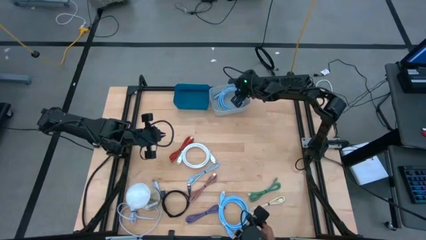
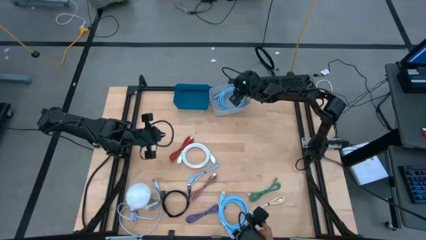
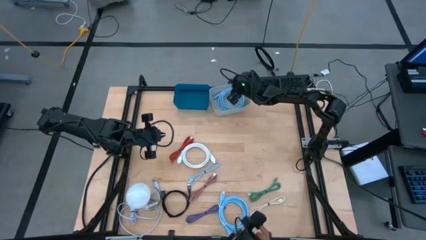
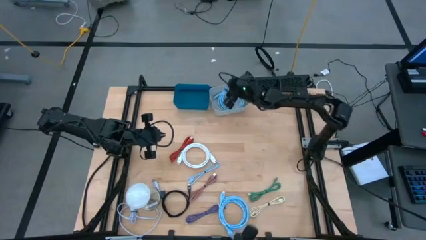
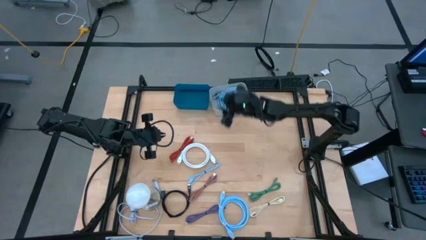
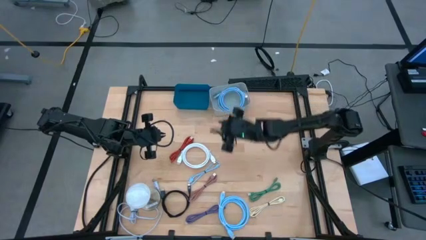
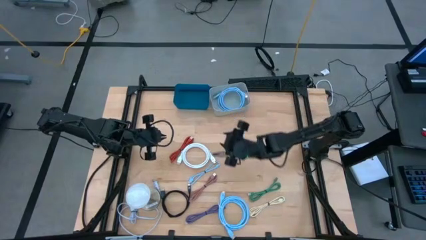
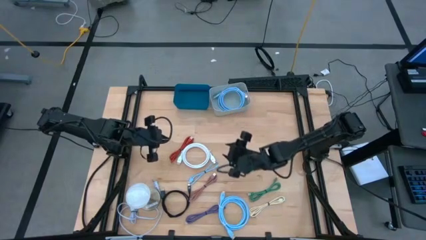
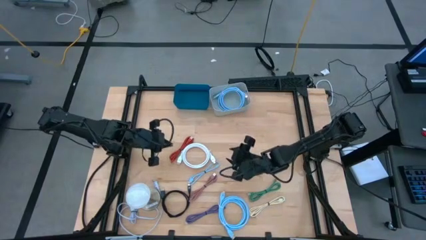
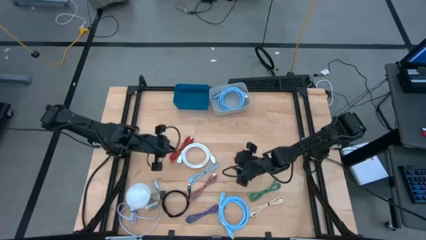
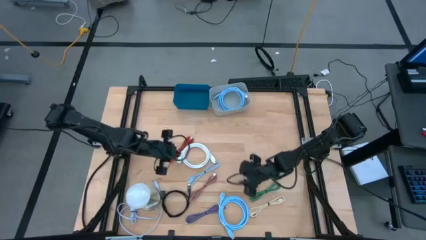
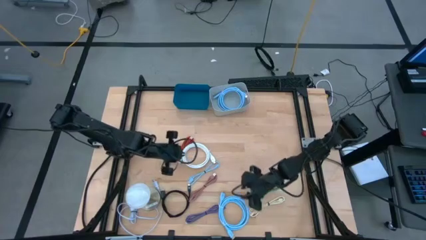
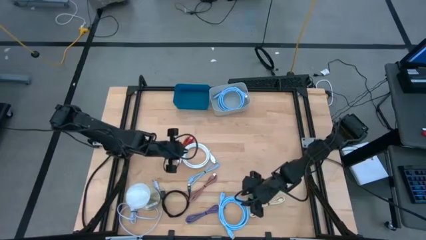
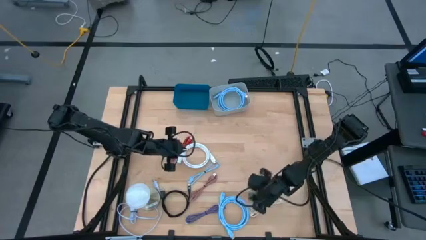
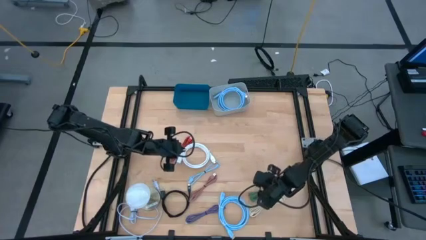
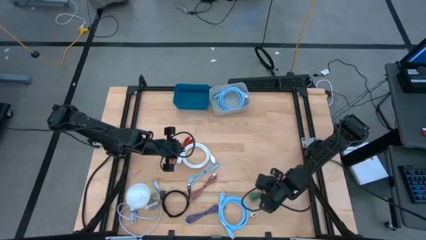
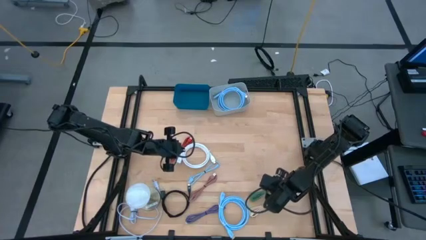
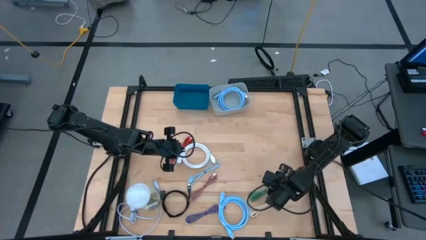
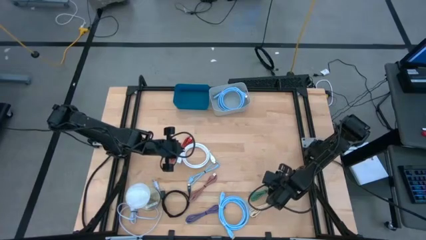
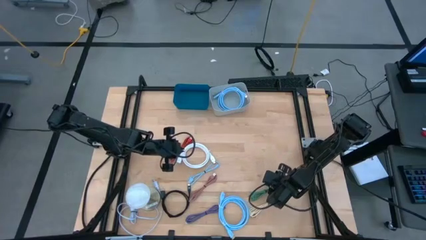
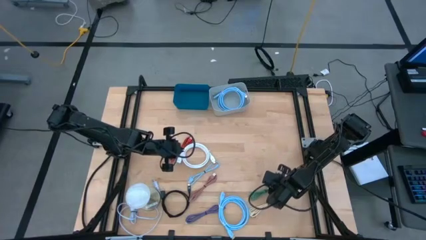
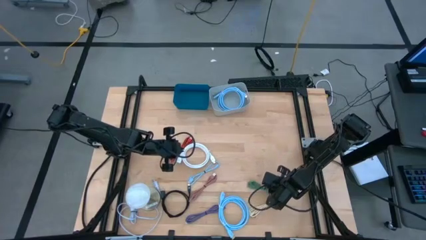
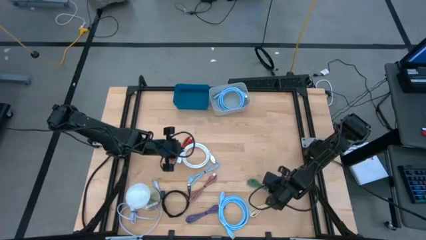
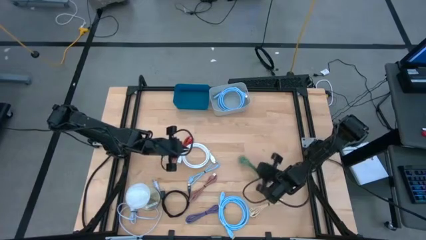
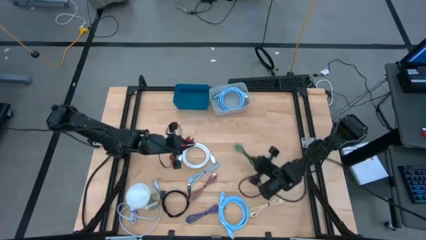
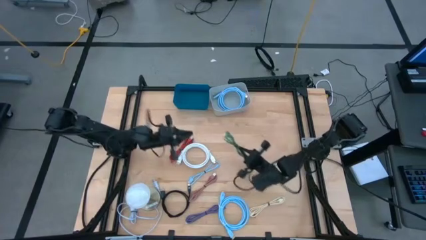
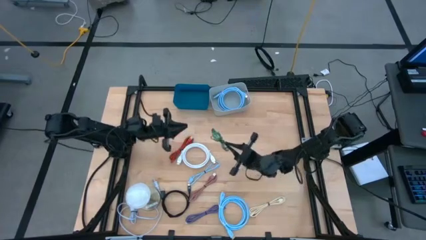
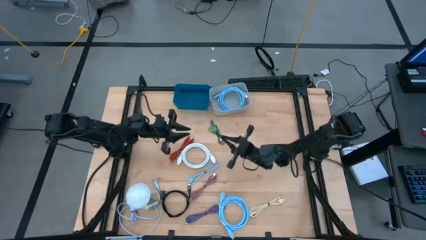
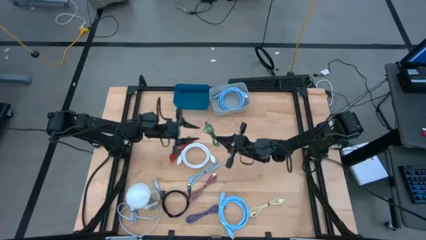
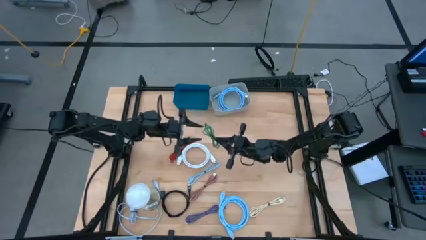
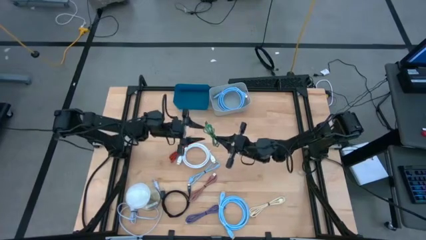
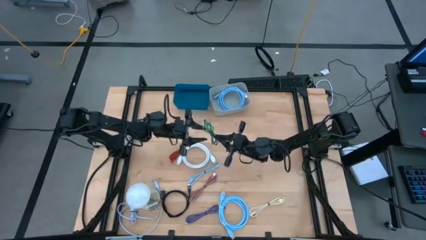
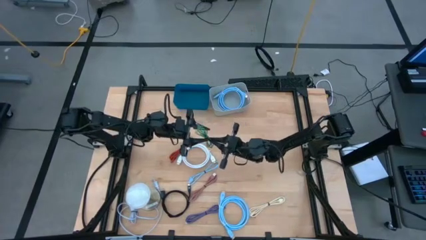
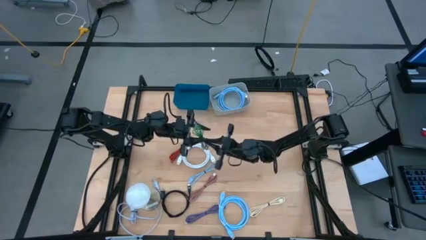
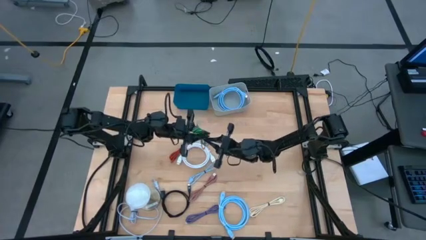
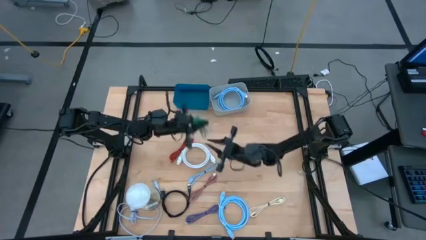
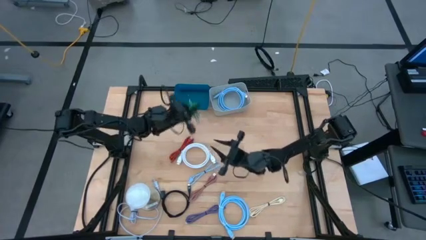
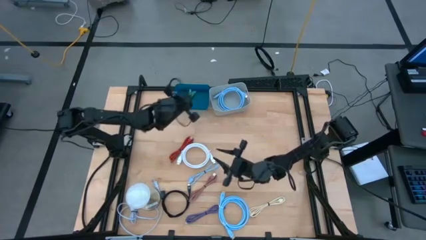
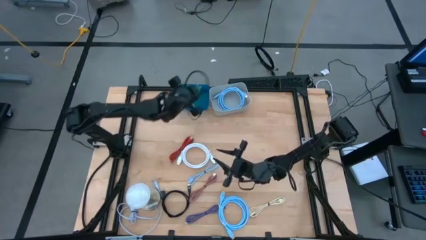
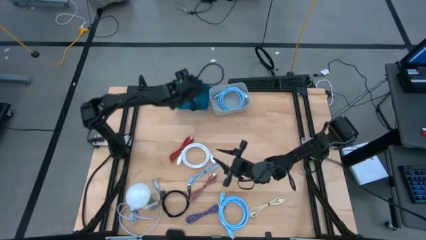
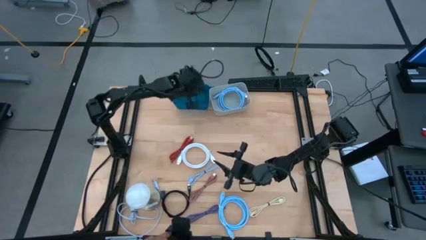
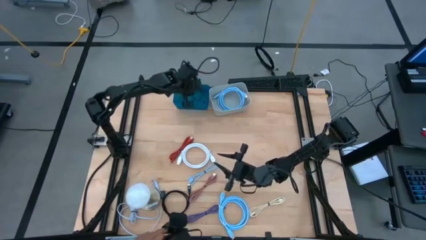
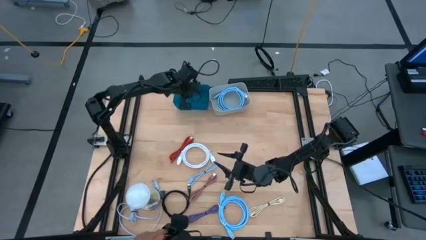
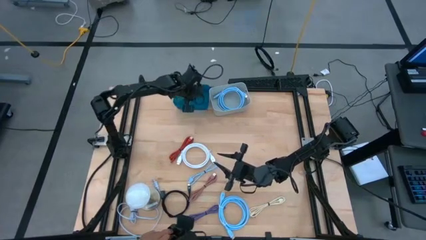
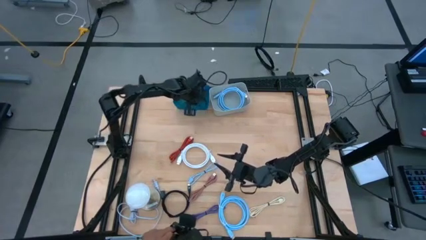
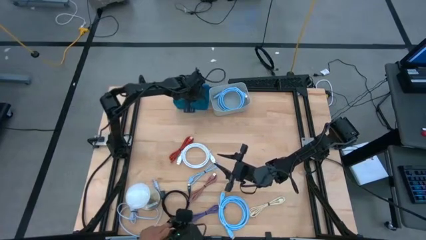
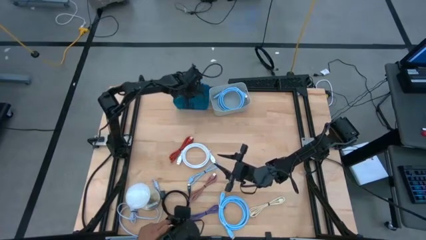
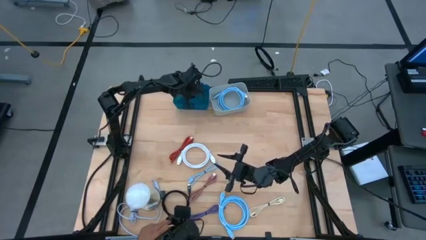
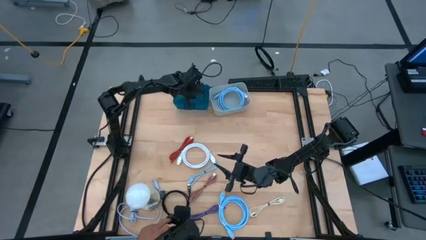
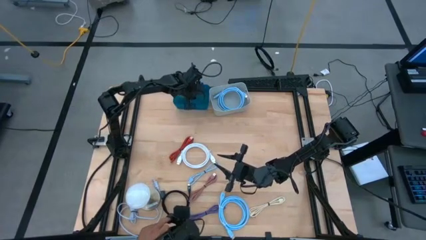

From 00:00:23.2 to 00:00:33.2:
Task: Pick & Place USB Port
Put the green usb cable into the blue bin

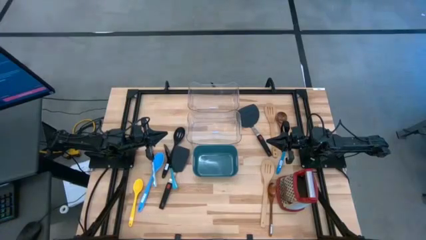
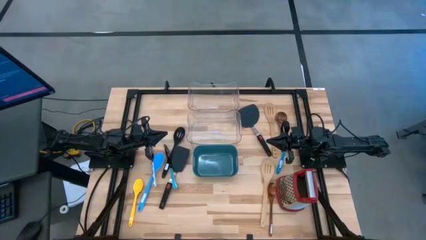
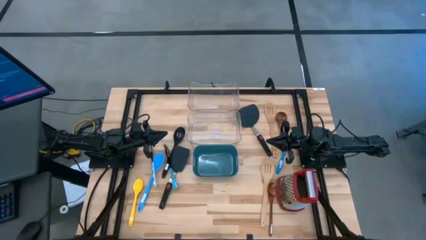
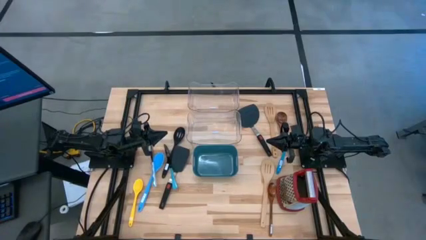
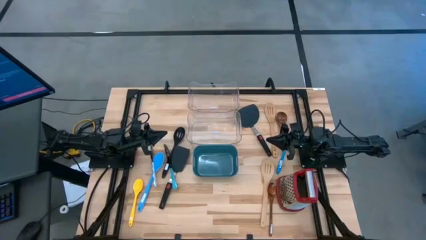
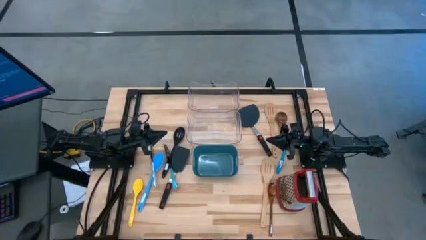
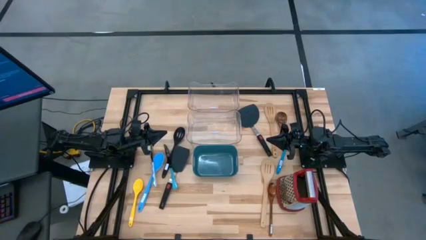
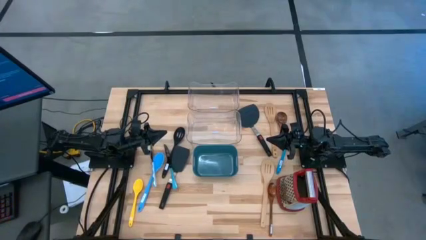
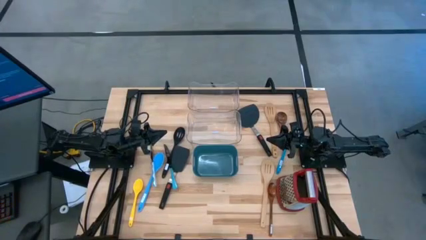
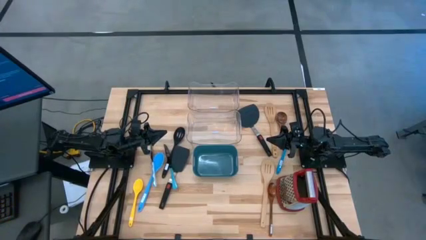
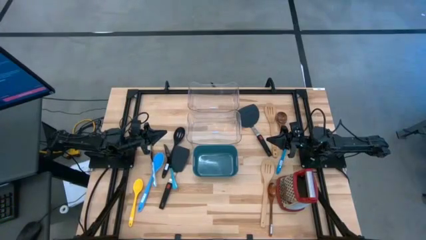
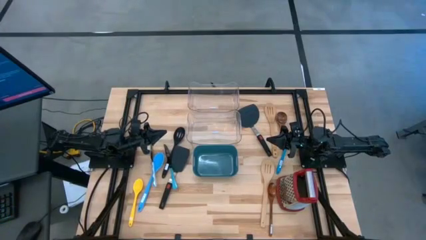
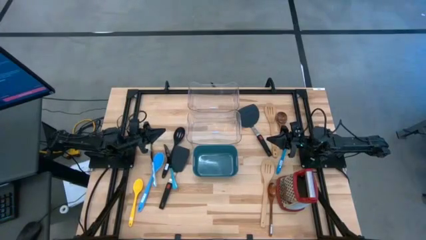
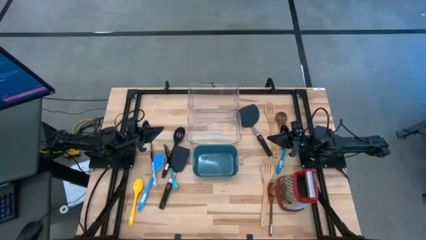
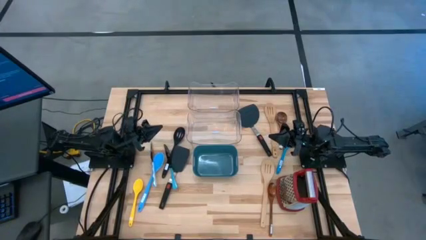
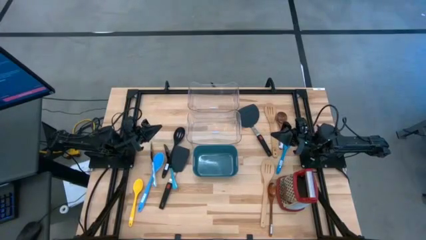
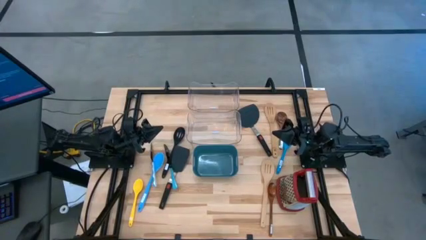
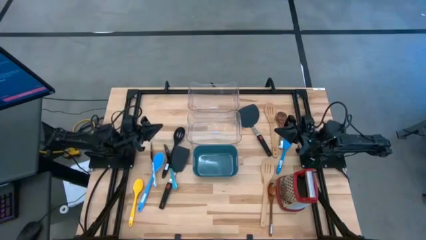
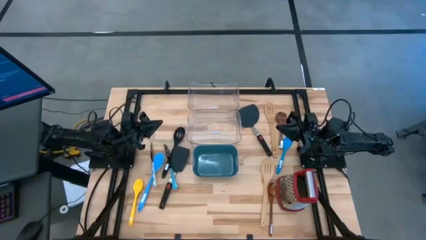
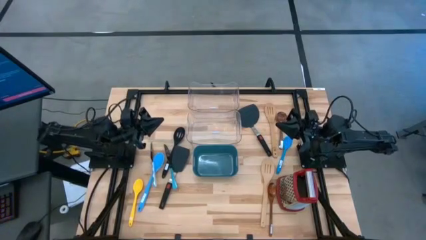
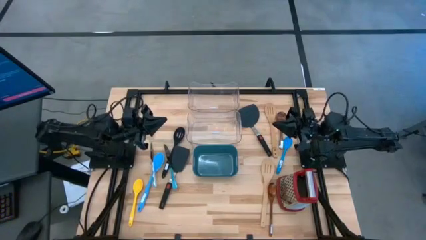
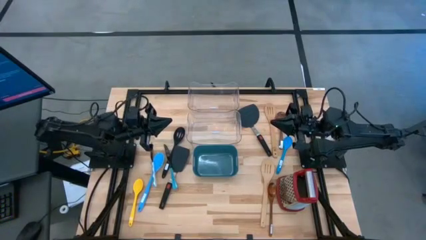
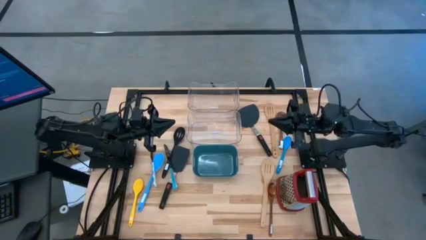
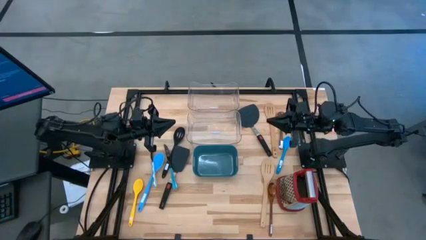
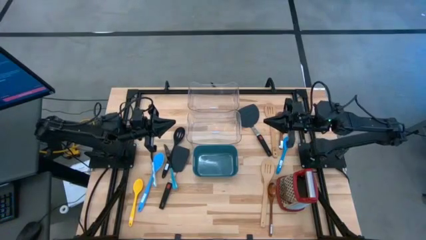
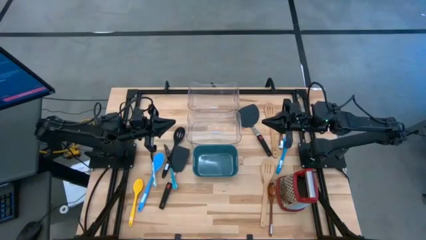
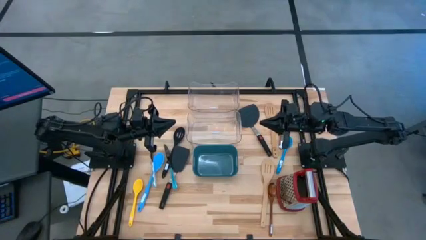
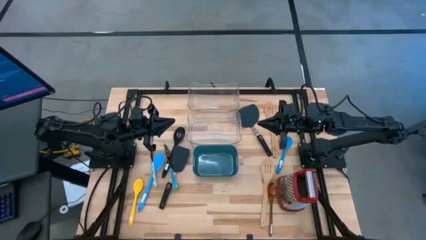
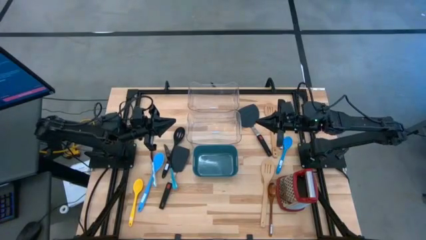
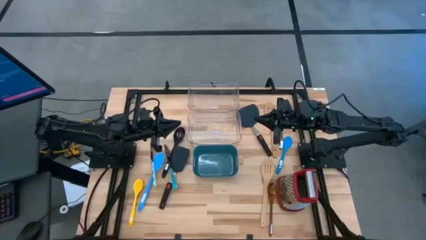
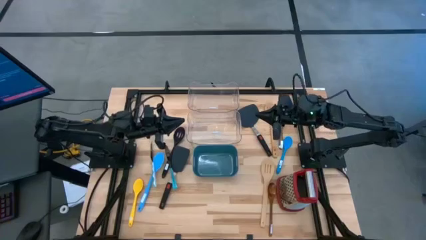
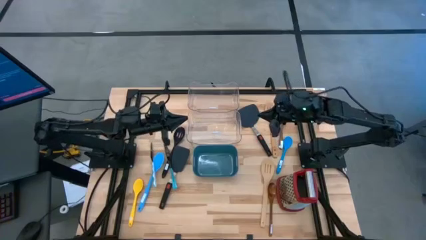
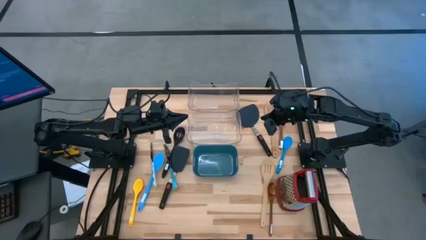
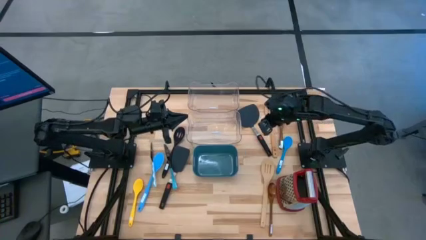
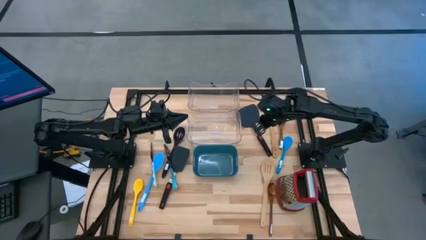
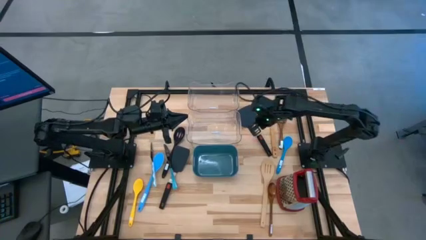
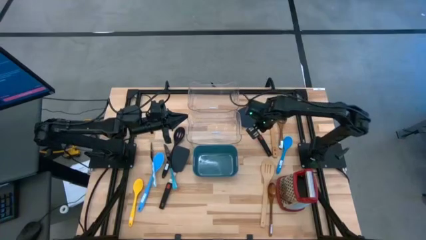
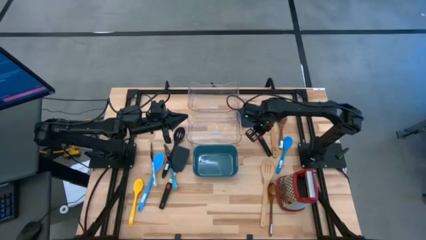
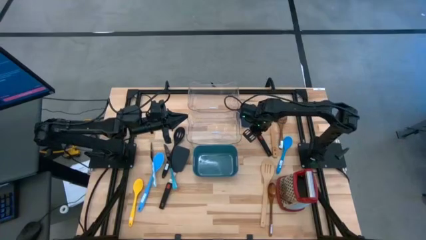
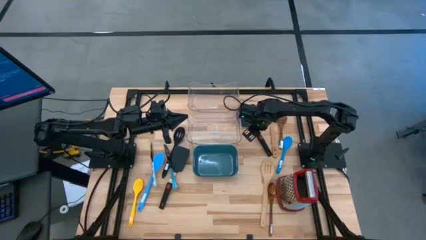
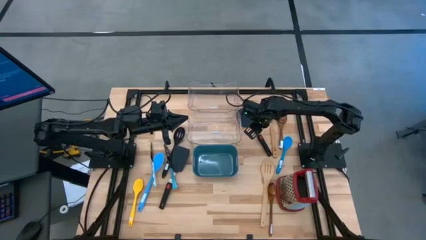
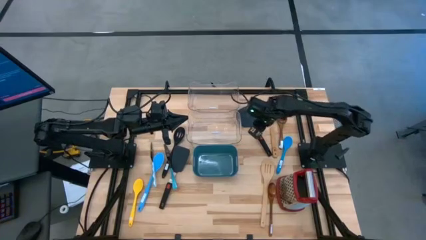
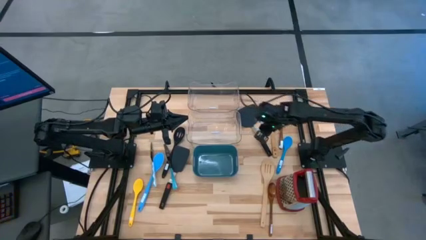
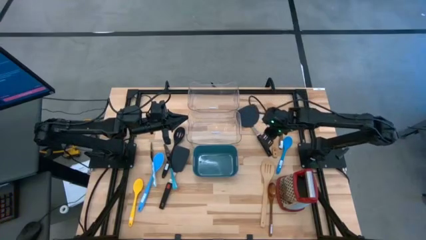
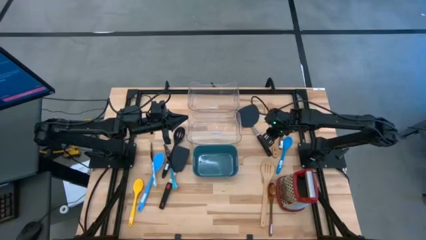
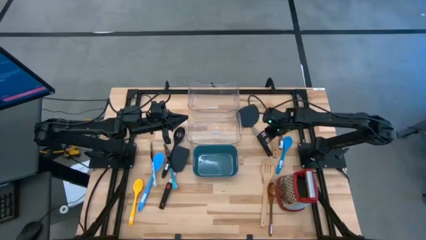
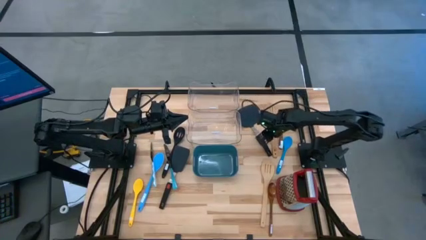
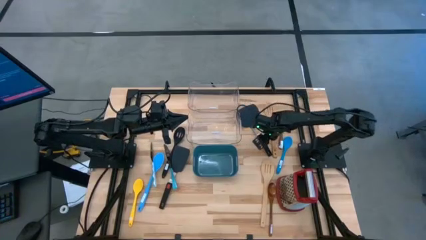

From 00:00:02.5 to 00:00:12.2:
Task: Pick & Place Kitchen Items
Put the black spatula into the top transparent bin
